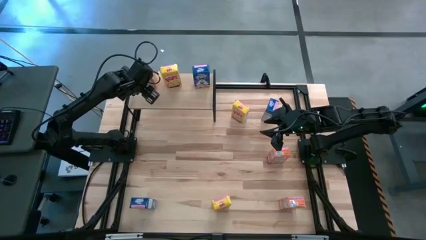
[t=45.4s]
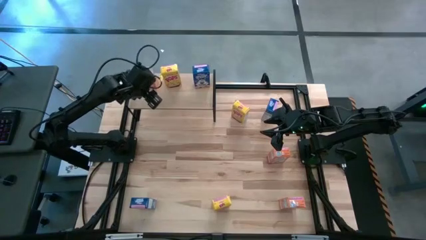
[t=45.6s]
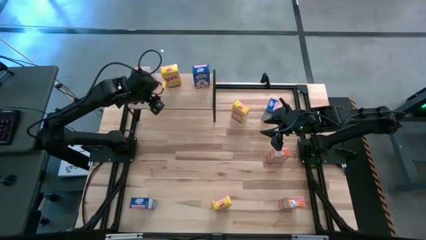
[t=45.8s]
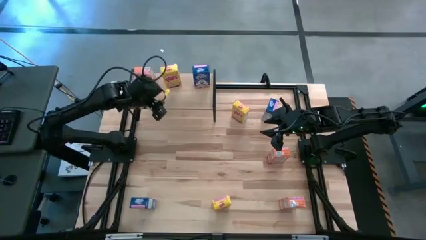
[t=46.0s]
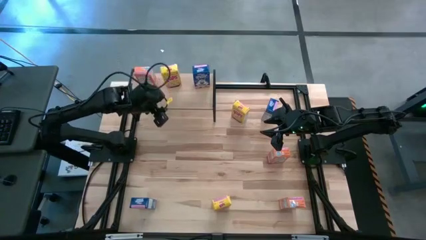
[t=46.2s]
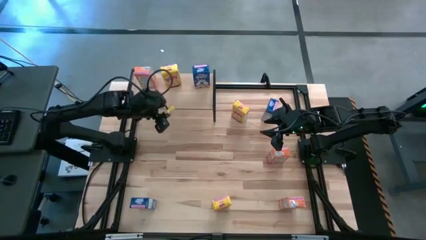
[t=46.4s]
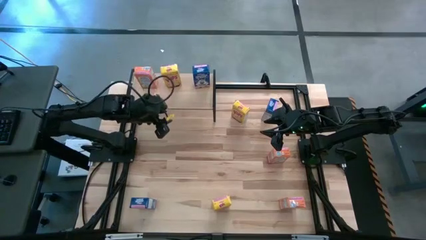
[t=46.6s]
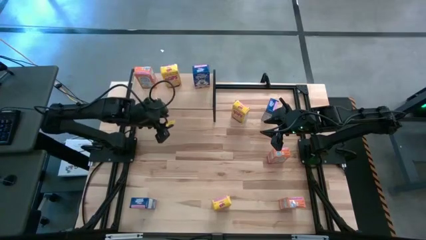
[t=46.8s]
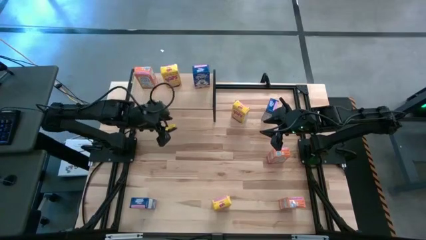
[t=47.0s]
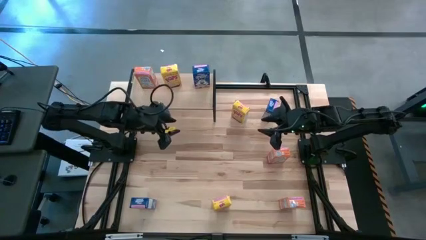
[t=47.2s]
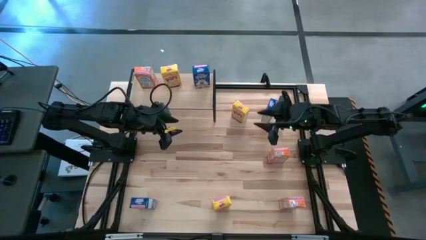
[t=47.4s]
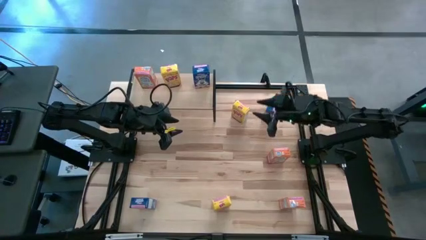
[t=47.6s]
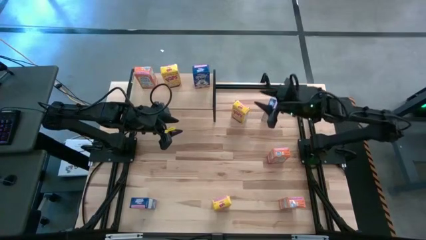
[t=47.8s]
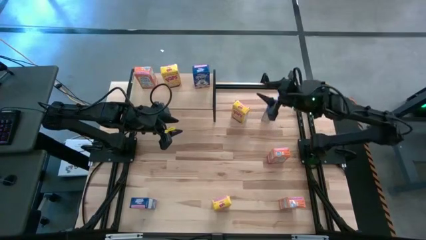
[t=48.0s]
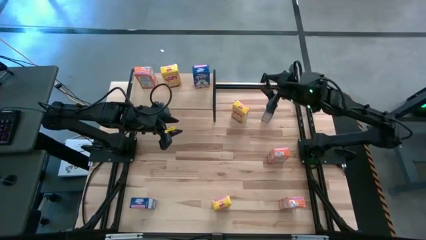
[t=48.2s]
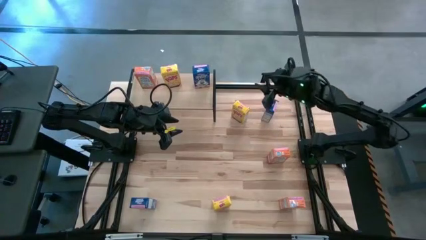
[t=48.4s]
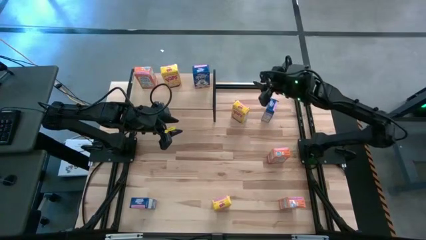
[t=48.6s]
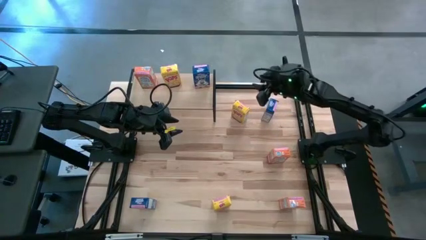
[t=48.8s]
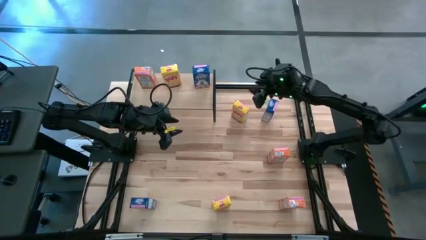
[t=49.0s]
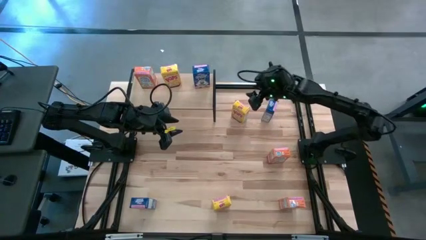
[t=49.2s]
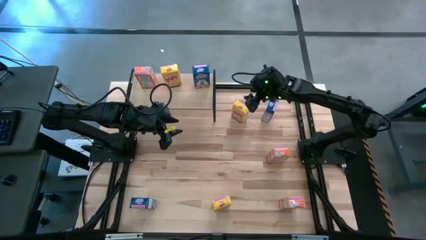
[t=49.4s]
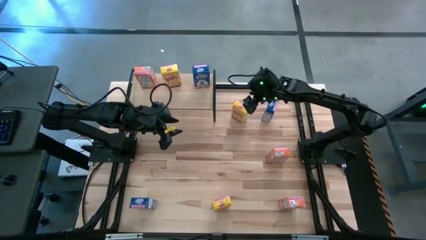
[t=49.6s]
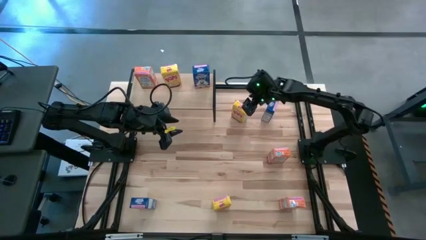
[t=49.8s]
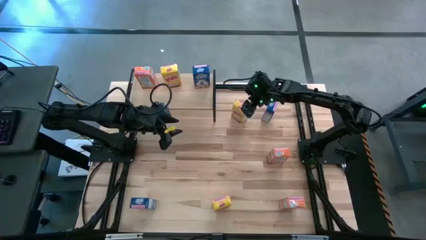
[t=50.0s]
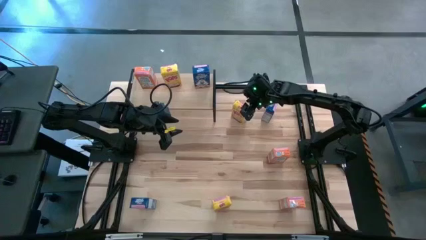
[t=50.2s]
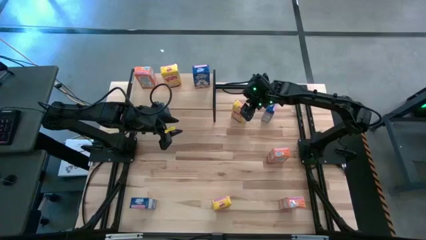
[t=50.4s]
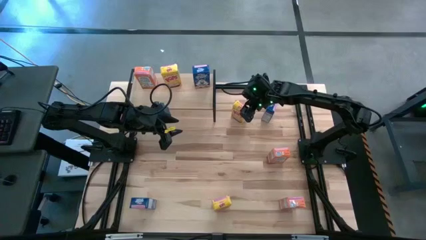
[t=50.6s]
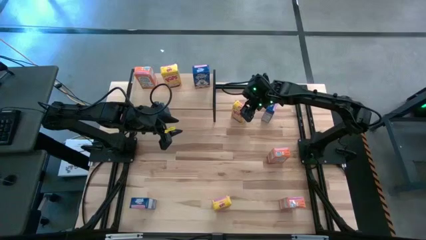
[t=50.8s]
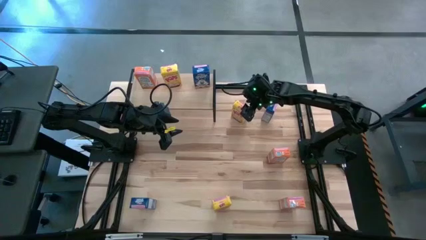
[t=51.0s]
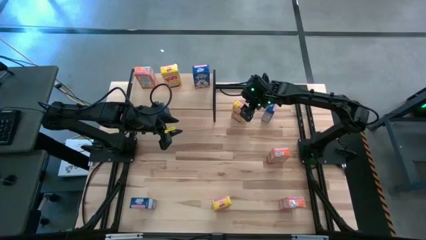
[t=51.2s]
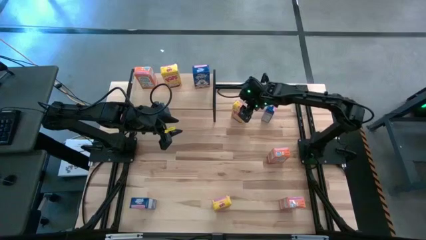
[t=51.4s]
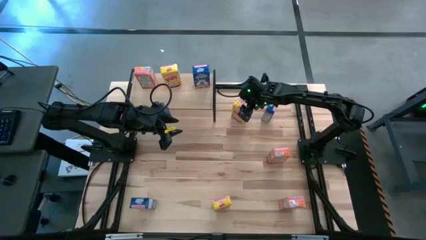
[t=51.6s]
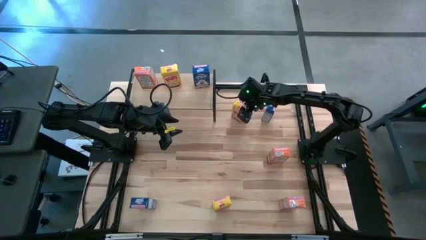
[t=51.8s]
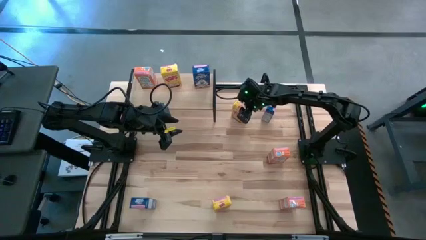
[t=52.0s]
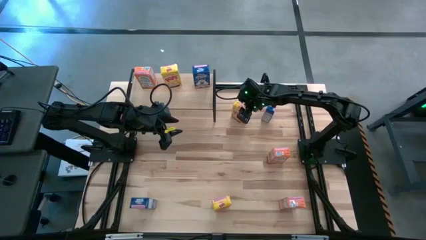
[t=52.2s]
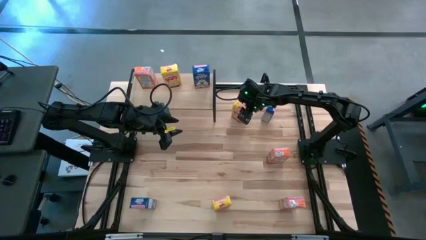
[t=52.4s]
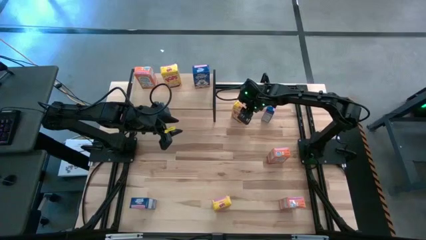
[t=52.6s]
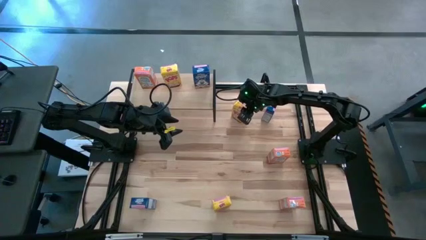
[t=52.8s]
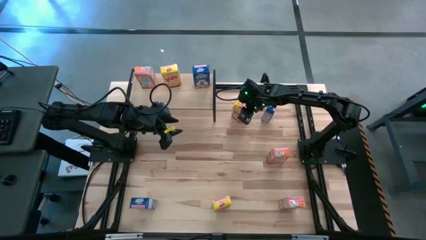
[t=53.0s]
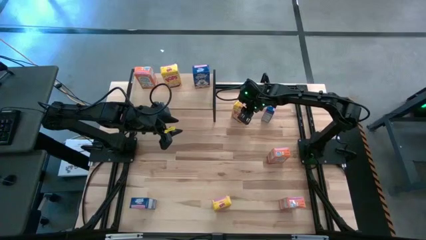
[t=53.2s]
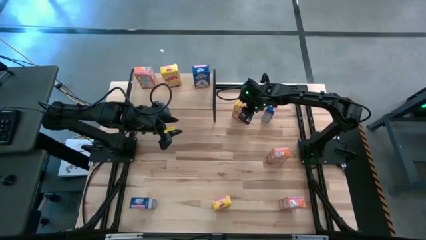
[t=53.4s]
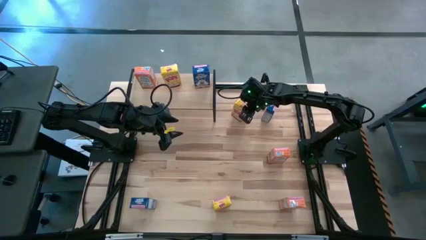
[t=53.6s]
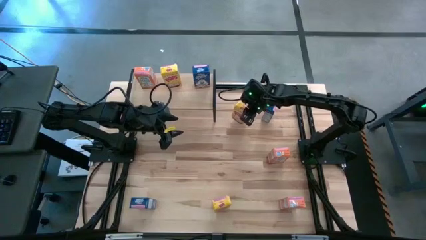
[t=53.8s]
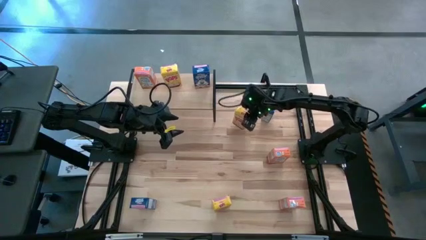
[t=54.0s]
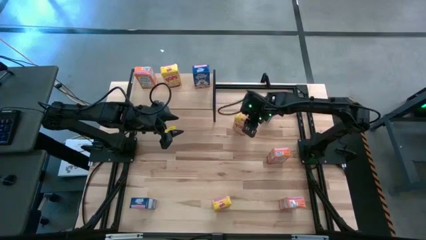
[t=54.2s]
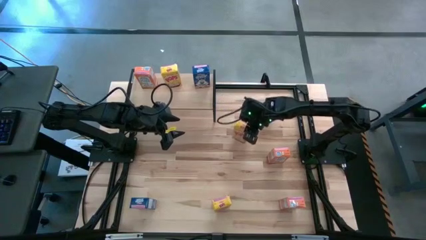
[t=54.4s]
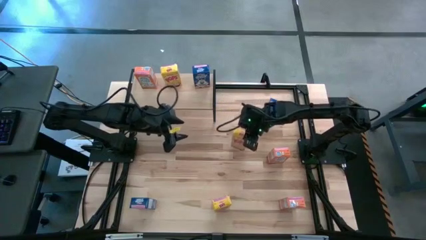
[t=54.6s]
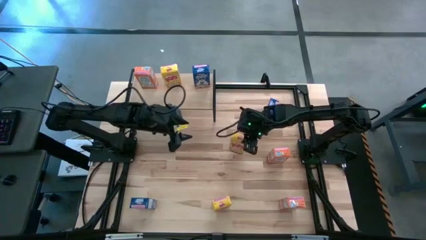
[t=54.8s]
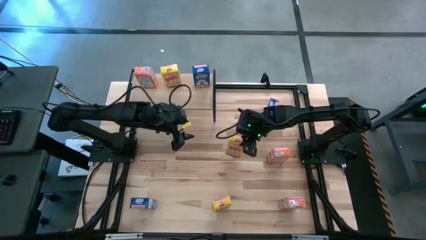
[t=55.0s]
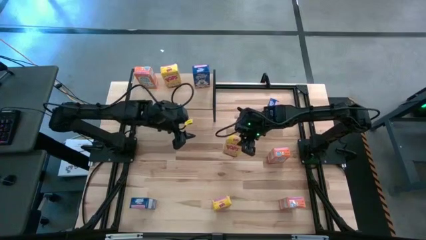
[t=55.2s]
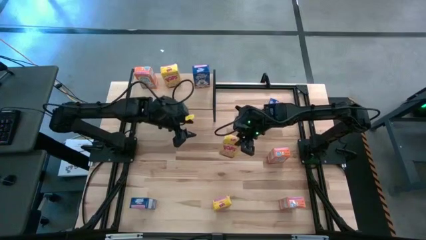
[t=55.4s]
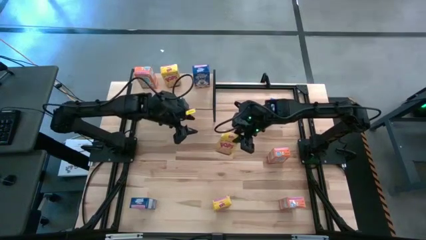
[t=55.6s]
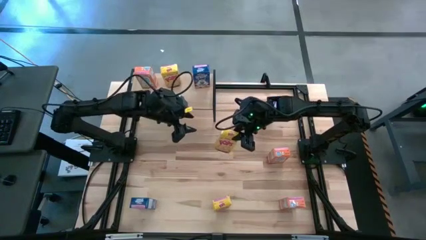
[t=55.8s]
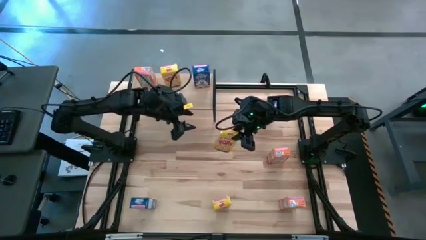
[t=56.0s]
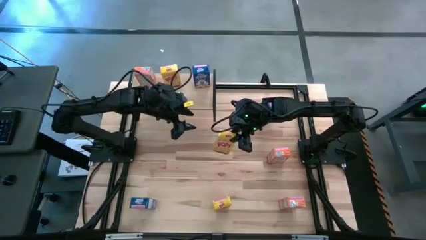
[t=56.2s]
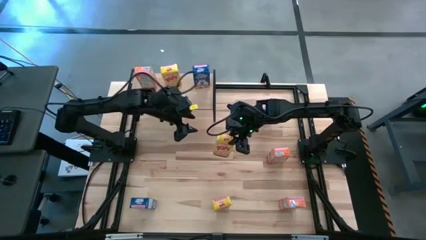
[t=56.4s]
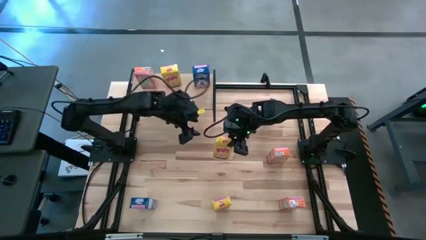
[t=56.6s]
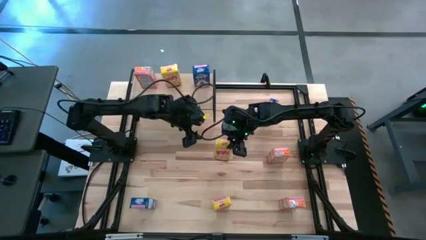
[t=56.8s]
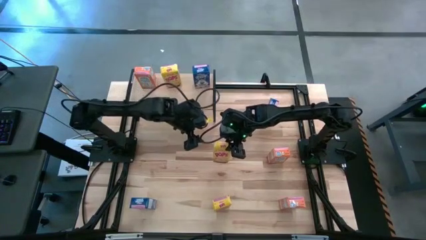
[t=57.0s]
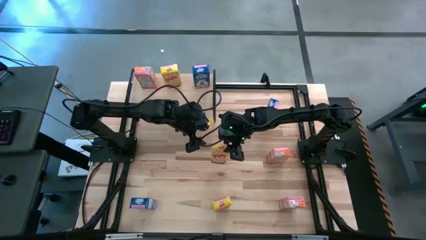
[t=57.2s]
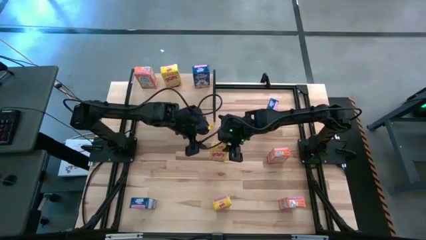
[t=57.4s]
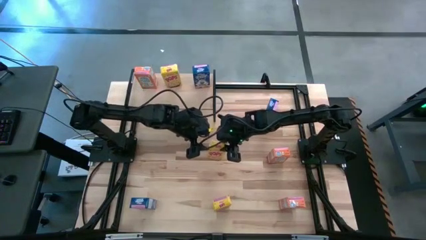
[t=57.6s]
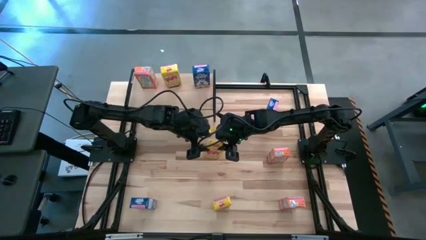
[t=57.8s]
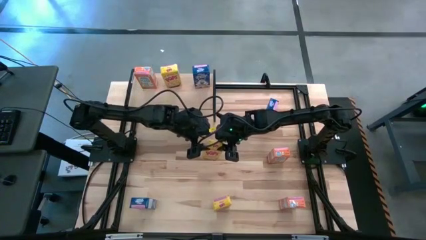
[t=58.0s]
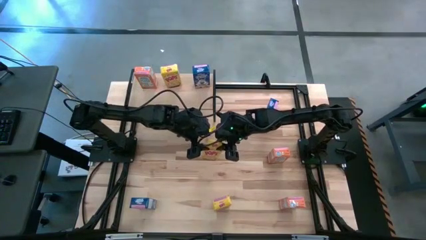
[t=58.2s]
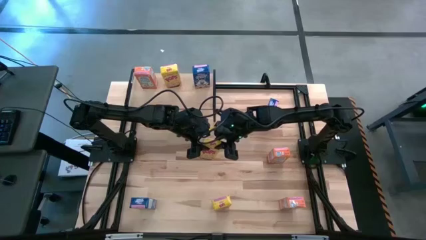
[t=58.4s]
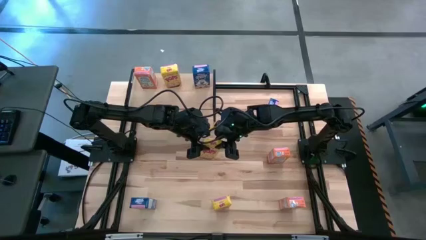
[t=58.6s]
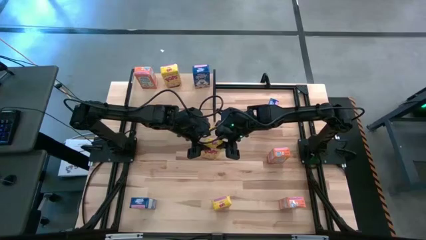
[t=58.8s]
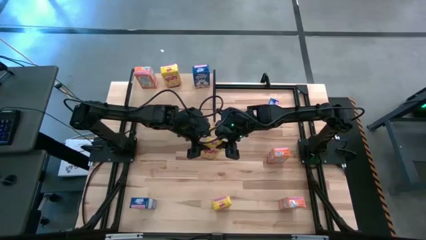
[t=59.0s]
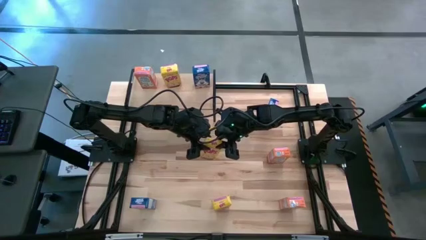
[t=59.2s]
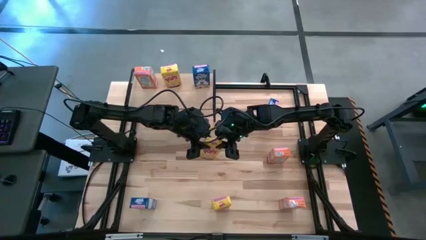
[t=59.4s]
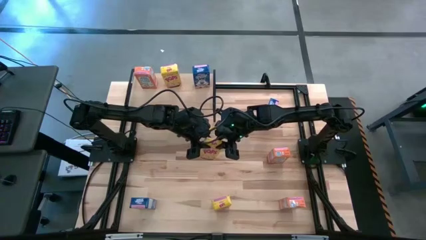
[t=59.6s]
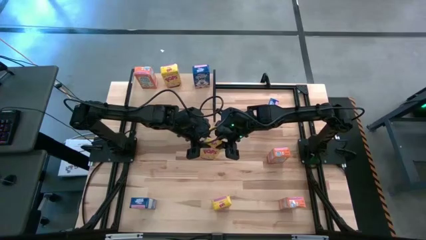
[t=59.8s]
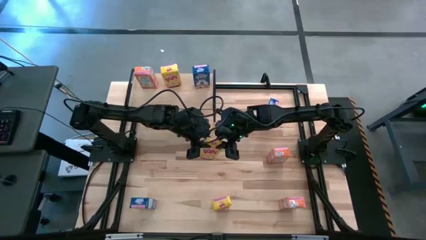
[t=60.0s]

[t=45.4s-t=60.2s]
Task: Stack cereal on shelf
Put the top yellow cereal box on the shelf aligned with the other yellow cereal box
